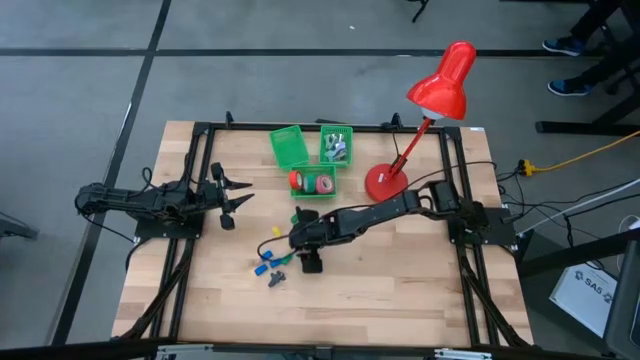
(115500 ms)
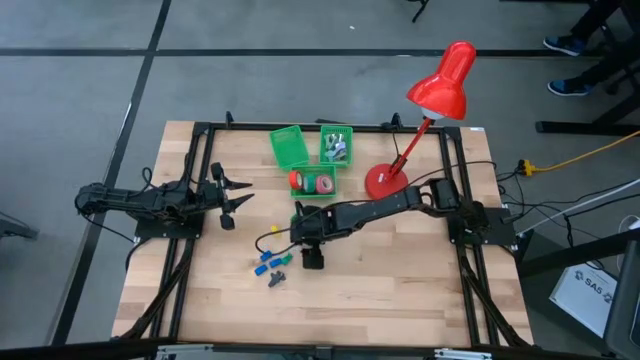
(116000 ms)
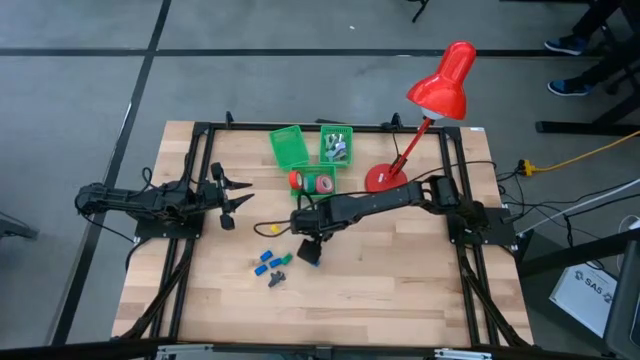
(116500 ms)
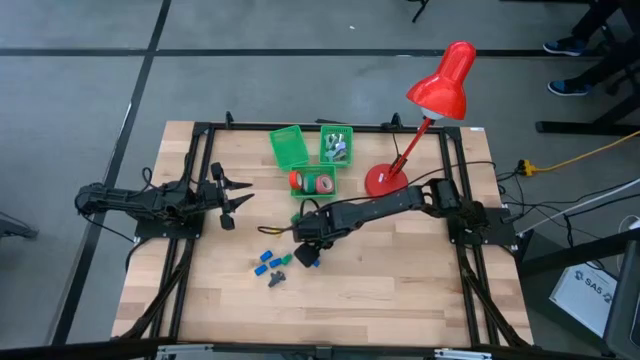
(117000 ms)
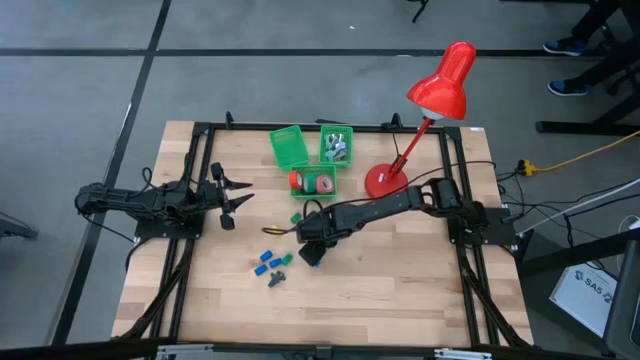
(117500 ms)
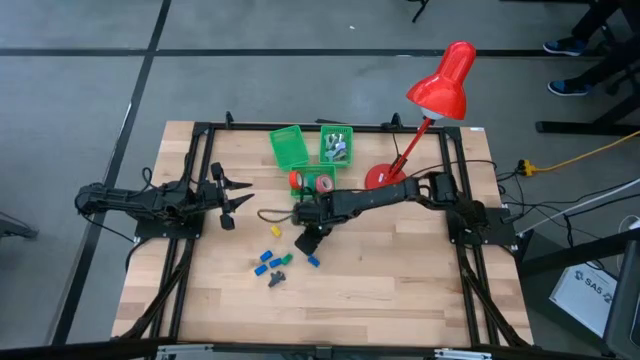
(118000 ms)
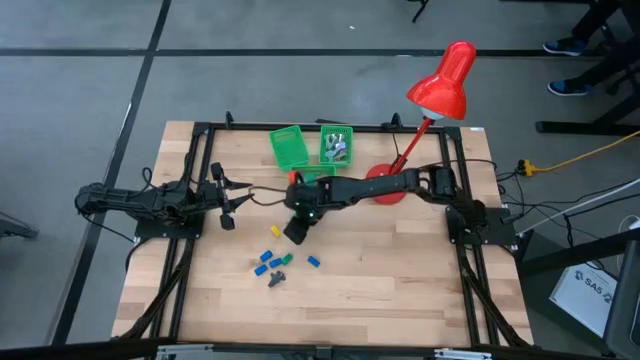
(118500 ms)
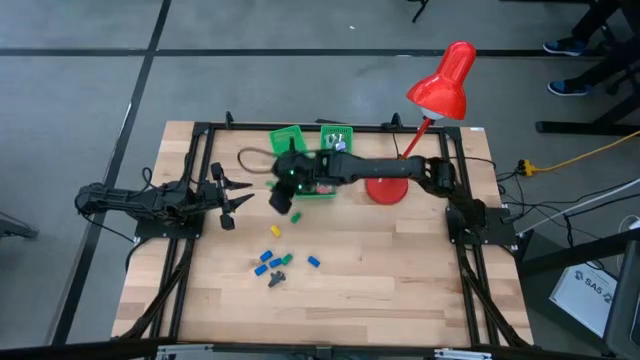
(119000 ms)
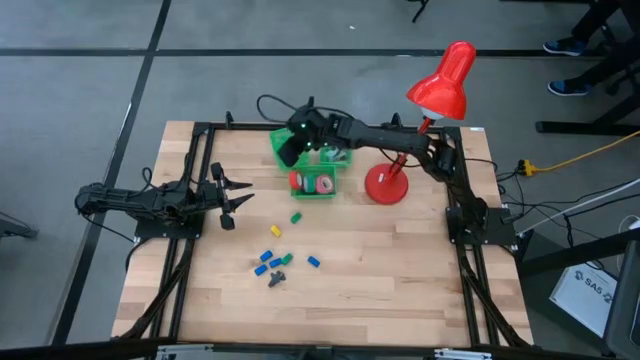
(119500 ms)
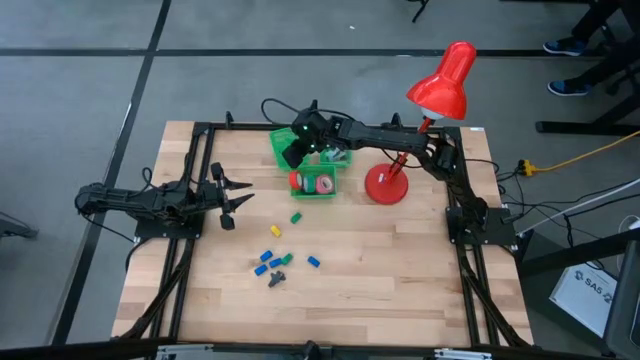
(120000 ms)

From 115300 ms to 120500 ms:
Task: Pick and place Stapler, Stapler remover, tape
Put the green stapler into the left green bin

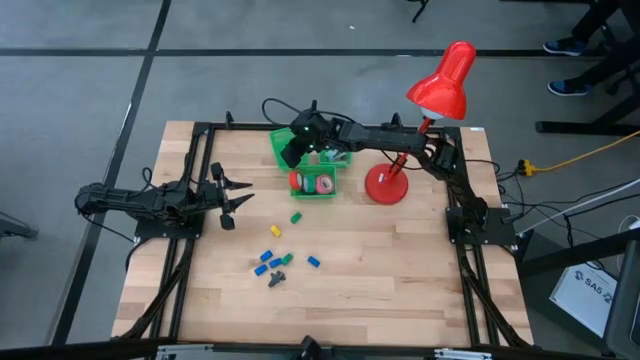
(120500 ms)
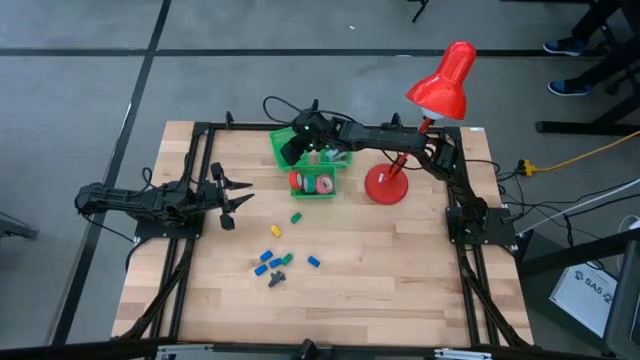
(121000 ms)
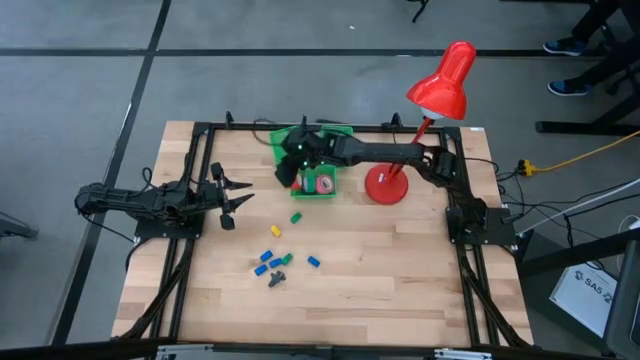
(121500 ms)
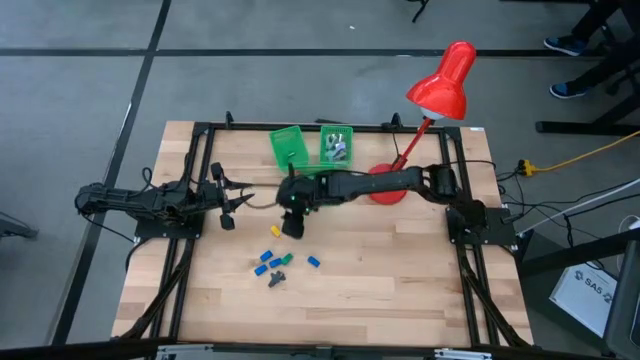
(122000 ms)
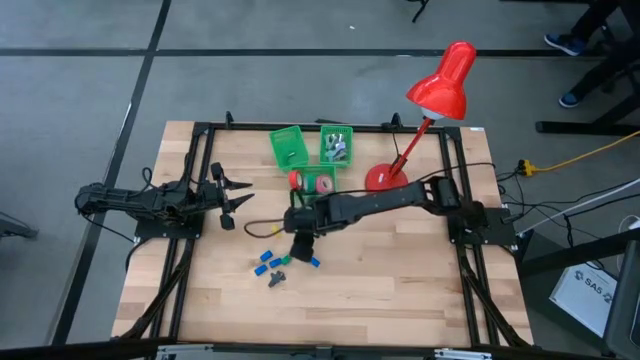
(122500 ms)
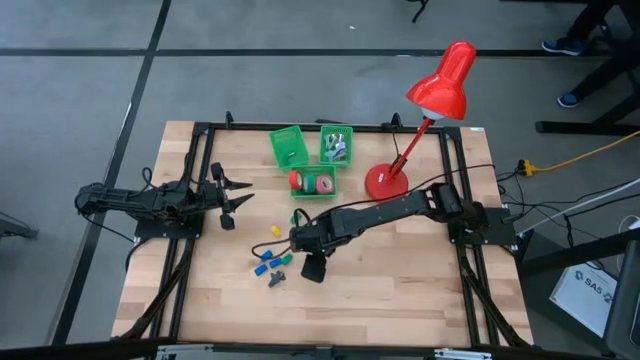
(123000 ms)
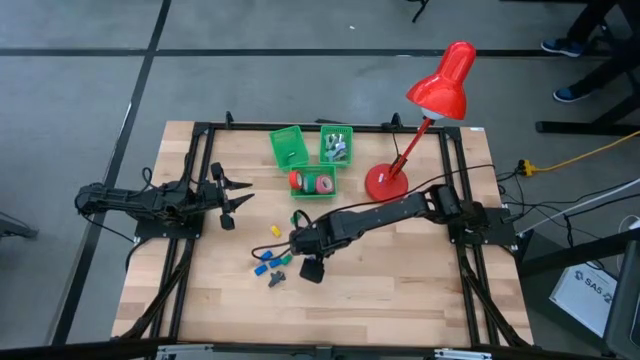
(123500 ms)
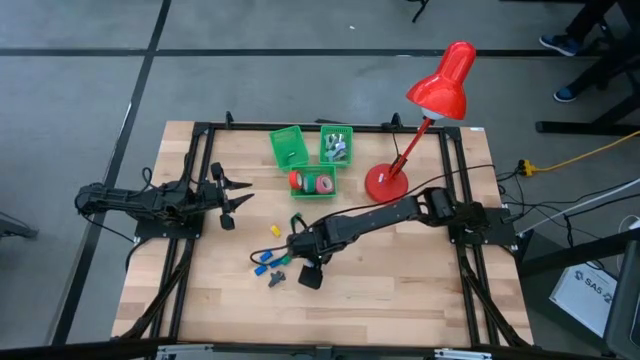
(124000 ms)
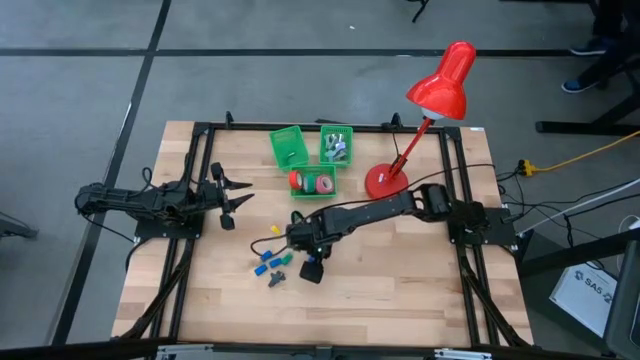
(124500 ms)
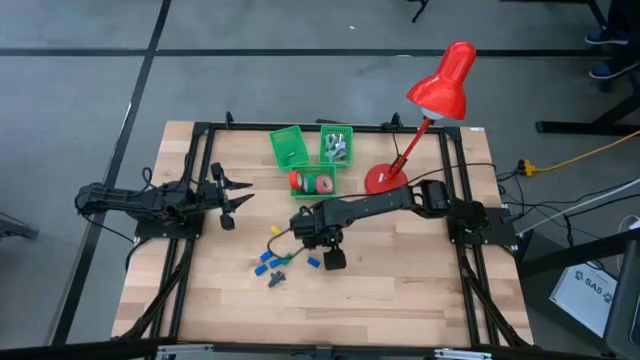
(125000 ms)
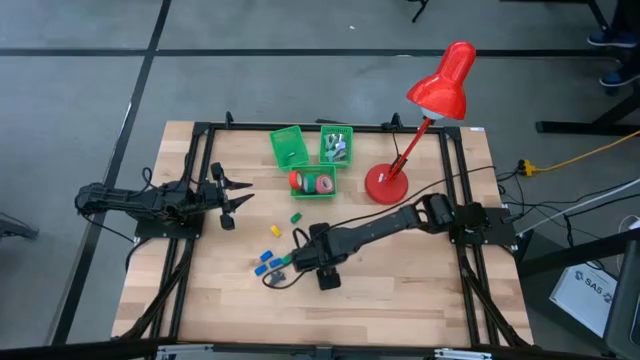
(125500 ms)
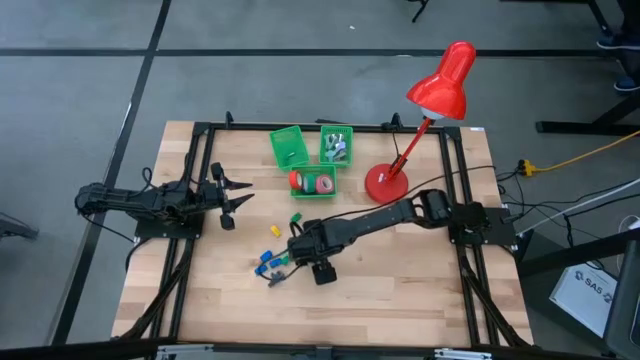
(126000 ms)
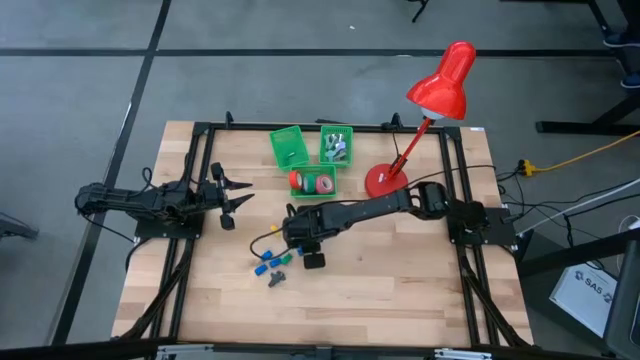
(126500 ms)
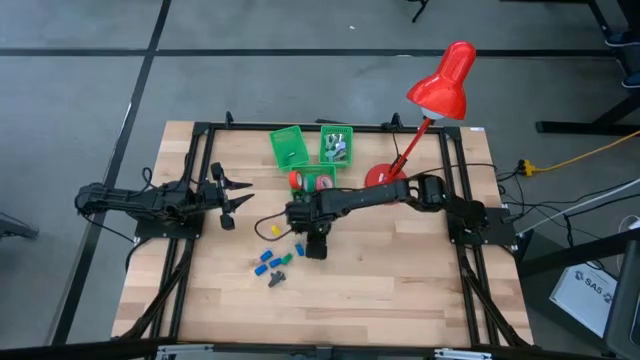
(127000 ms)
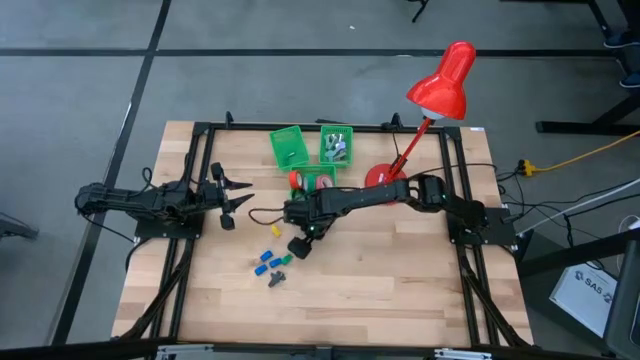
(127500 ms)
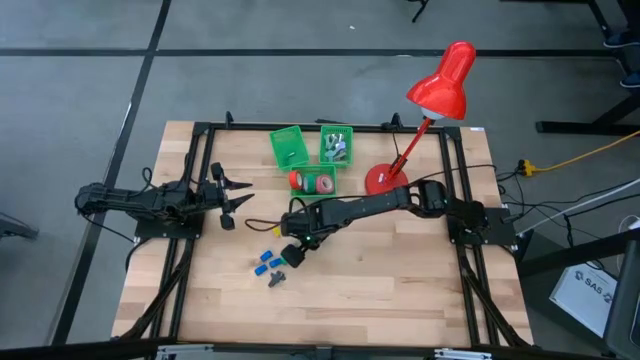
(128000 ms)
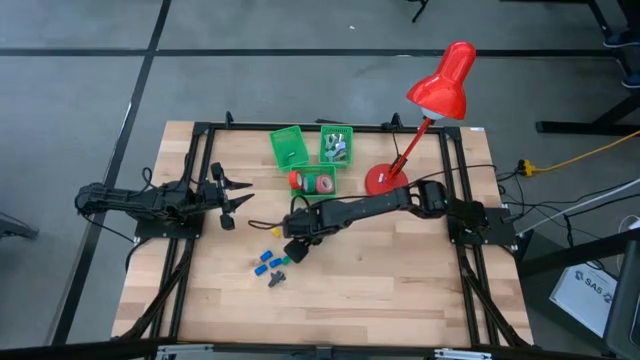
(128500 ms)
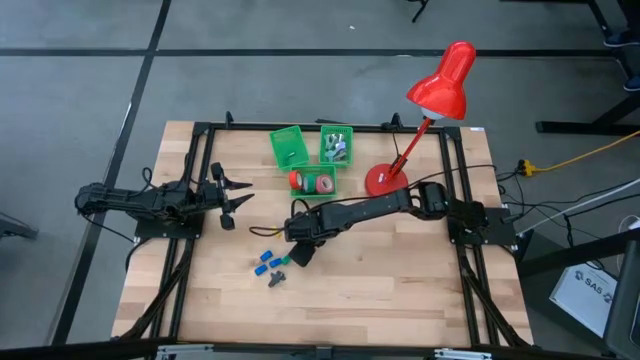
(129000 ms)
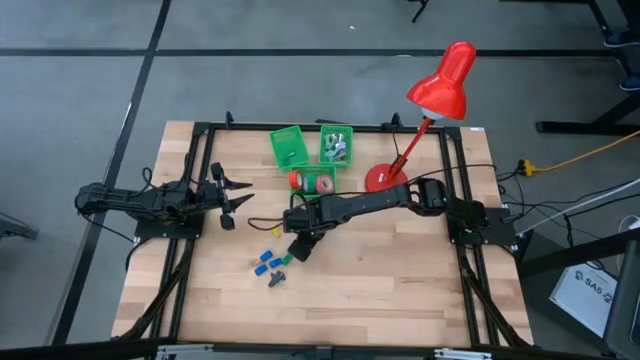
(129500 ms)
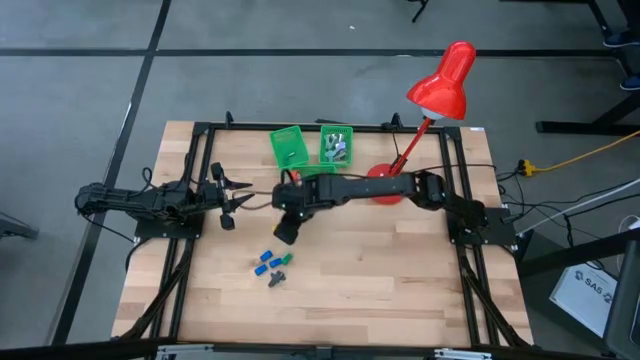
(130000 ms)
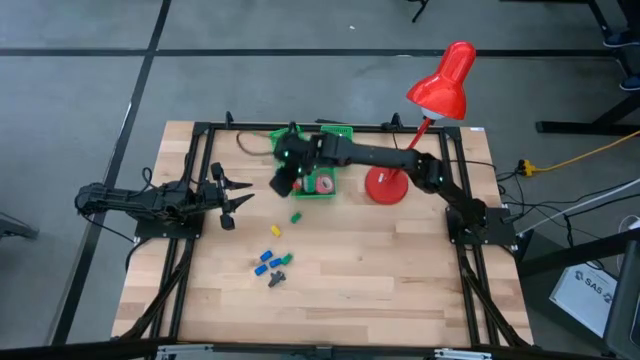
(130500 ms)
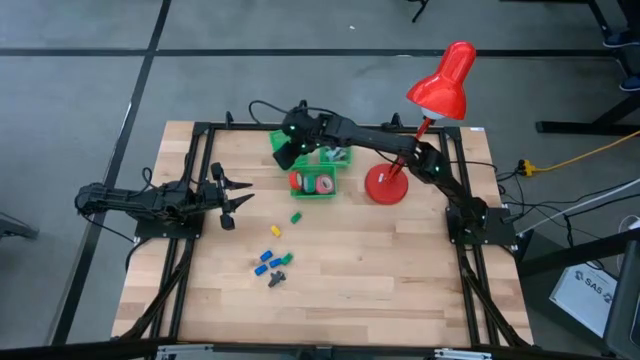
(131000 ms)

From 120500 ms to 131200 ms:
Put the blue stapler into the left green bin

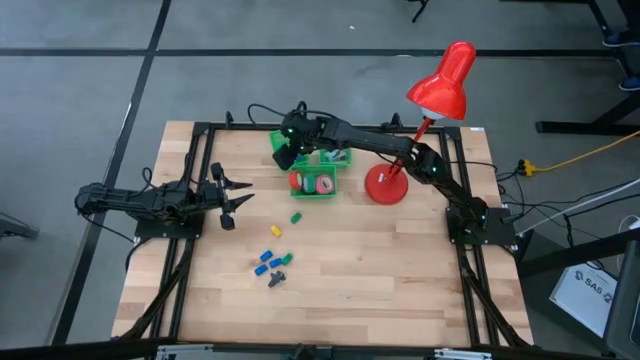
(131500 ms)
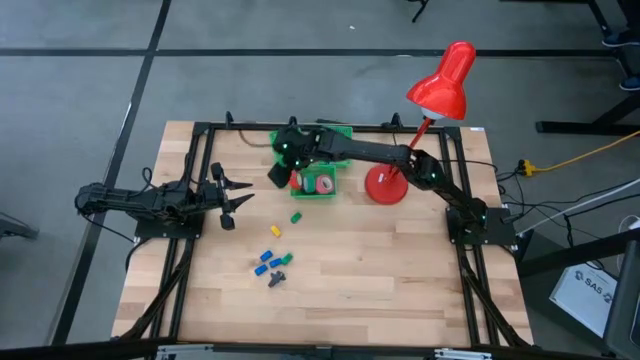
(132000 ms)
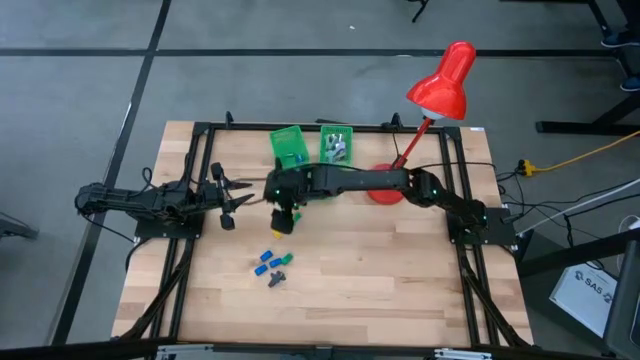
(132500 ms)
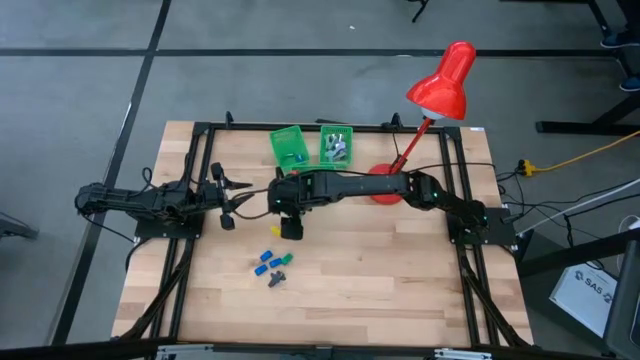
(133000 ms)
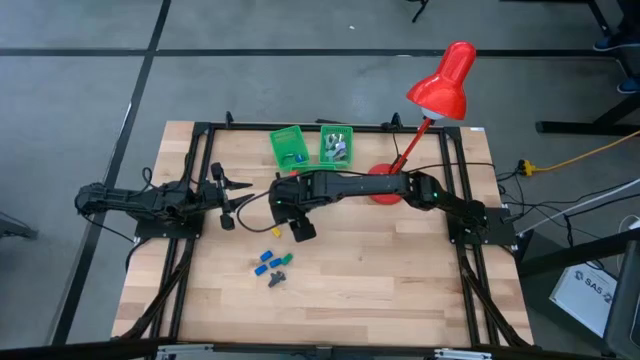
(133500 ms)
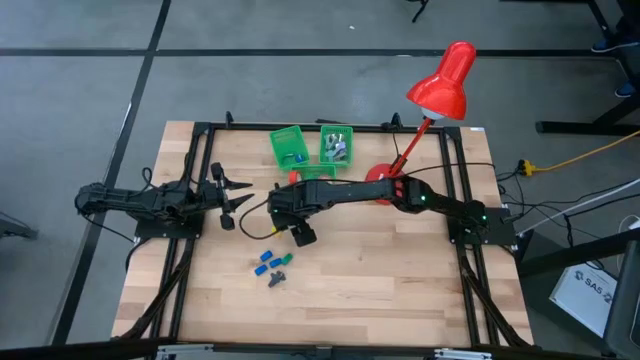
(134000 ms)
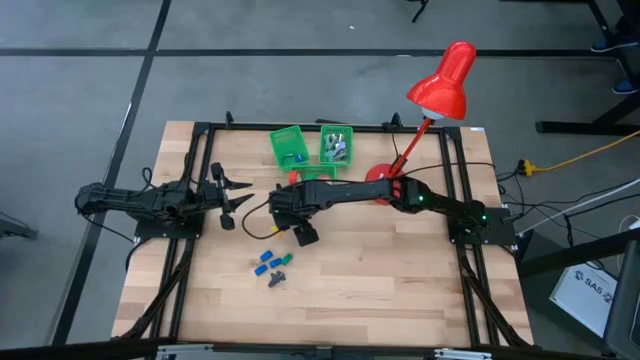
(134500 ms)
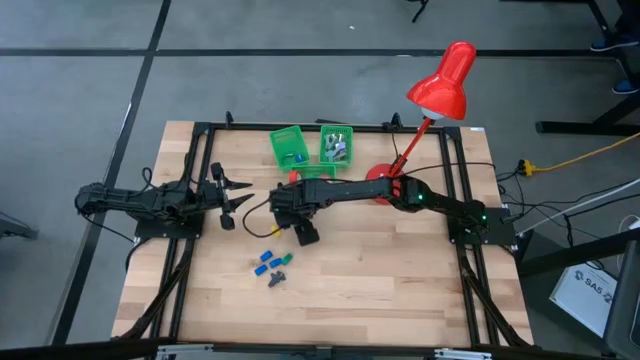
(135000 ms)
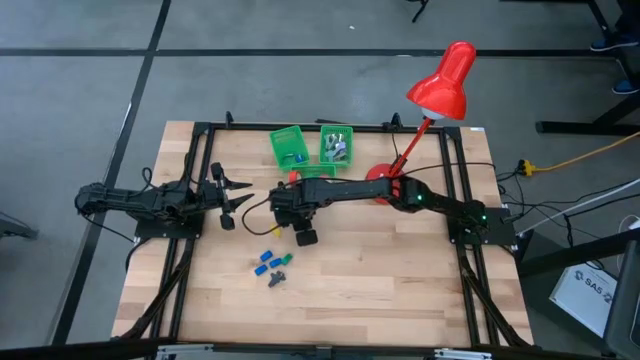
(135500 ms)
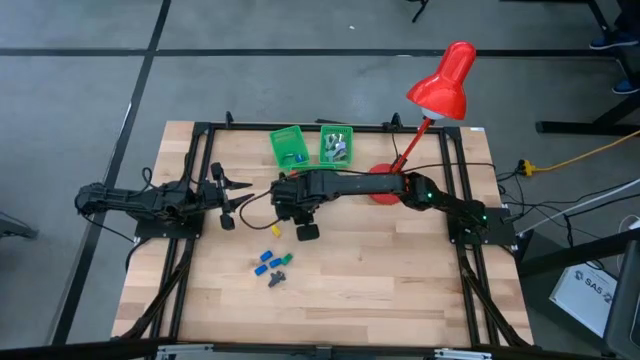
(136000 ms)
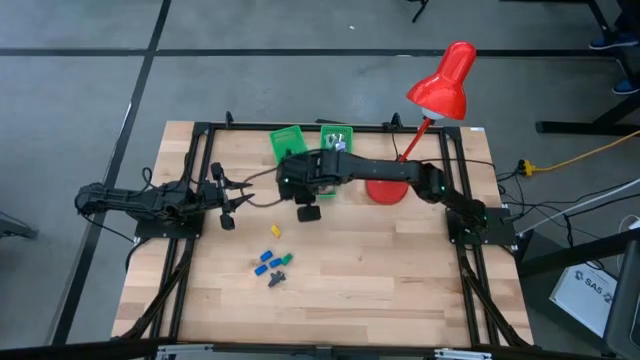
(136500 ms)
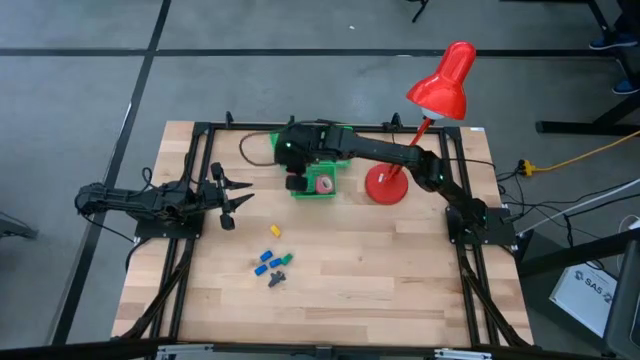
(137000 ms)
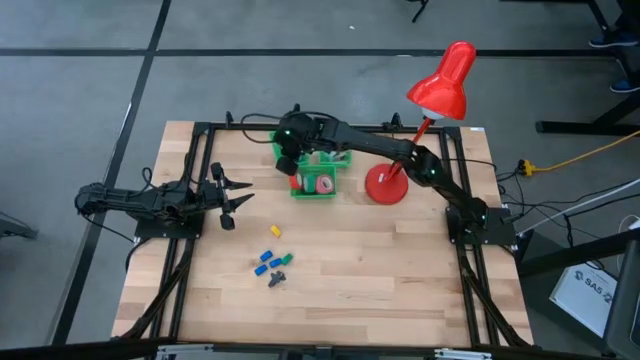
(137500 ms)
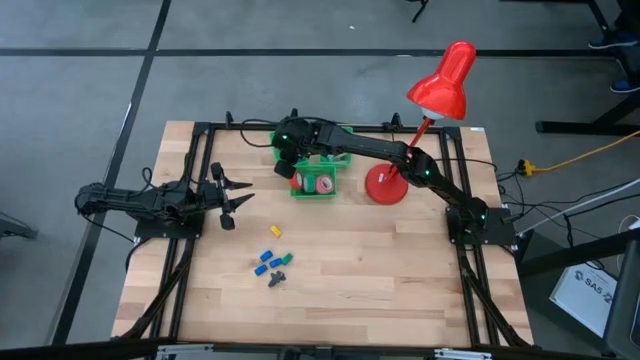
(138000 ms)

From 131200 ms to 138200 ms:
Put the green stapler into the left green bin
